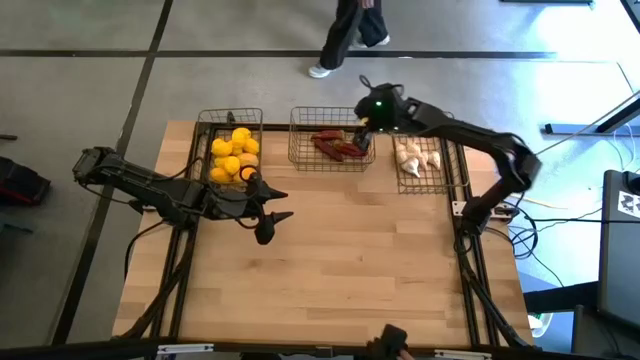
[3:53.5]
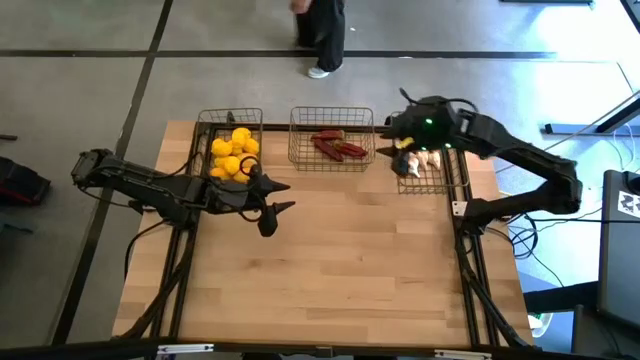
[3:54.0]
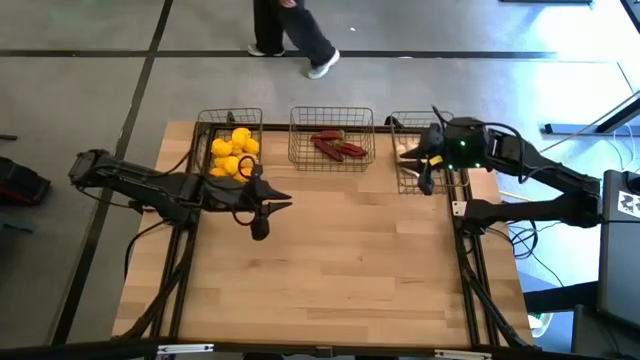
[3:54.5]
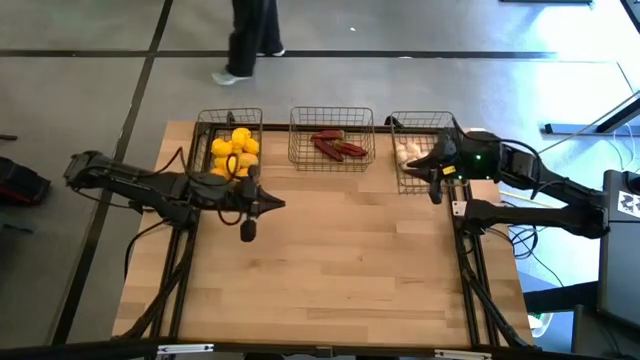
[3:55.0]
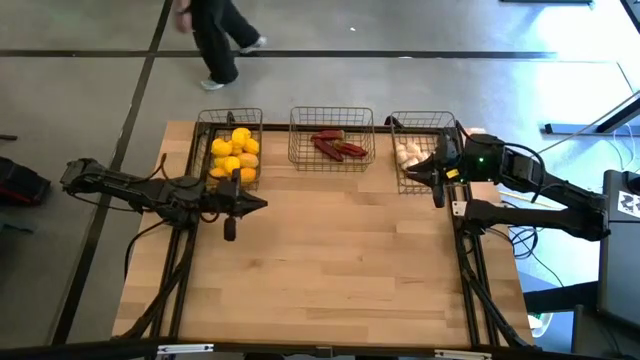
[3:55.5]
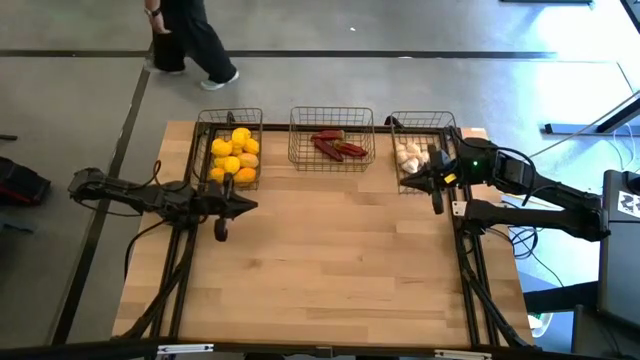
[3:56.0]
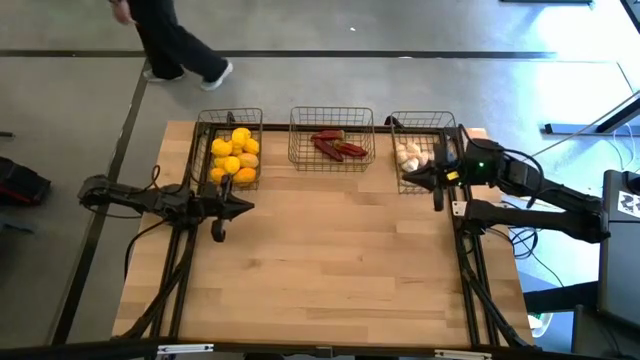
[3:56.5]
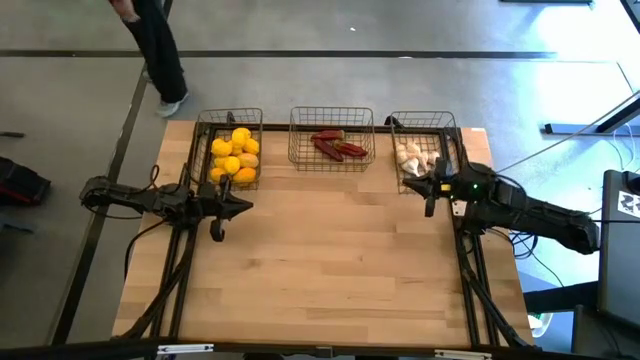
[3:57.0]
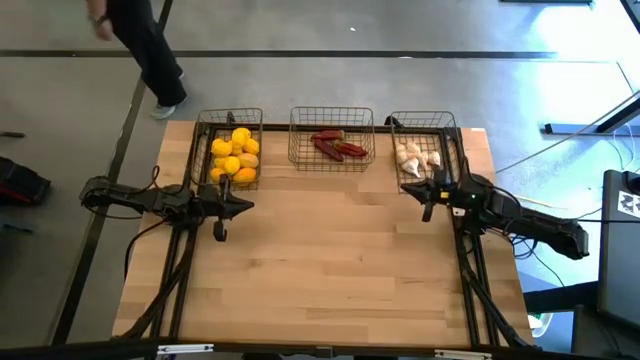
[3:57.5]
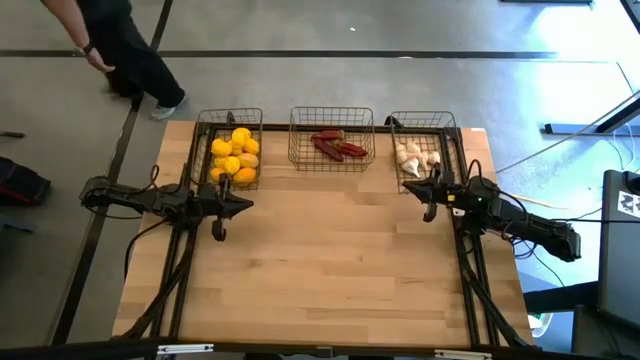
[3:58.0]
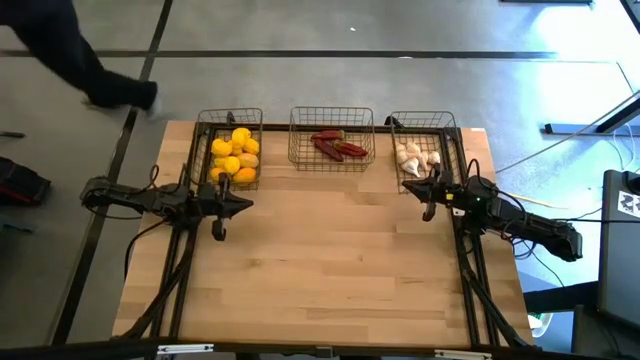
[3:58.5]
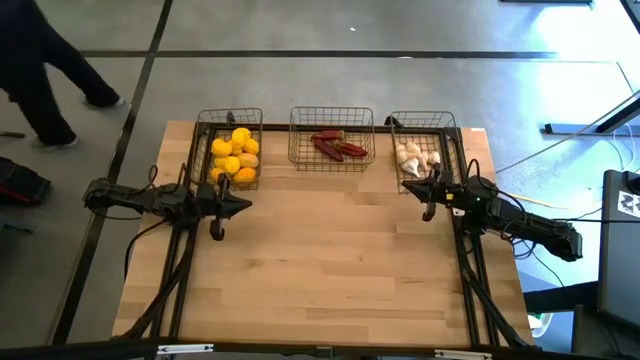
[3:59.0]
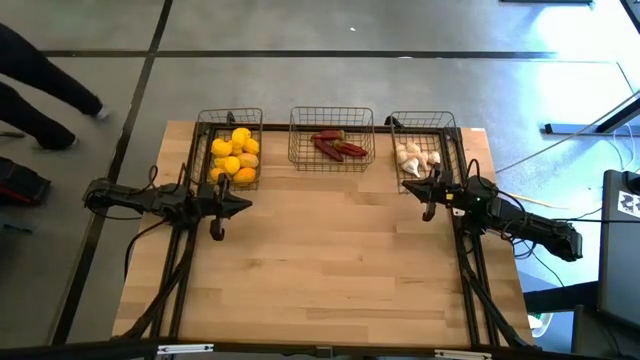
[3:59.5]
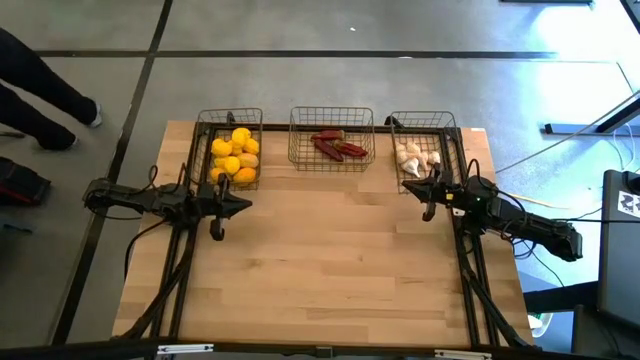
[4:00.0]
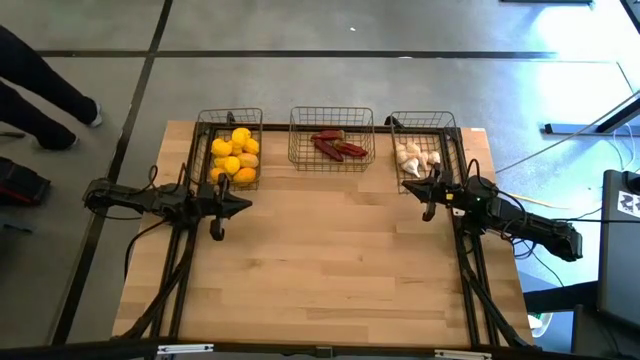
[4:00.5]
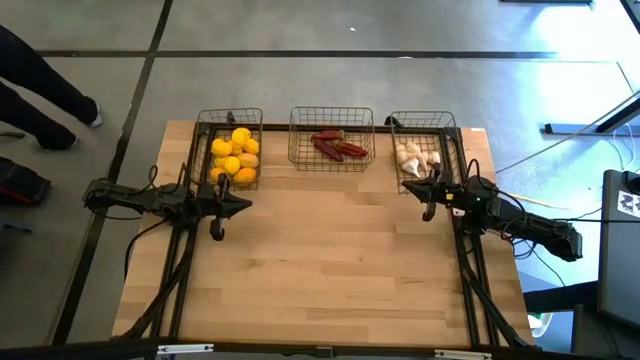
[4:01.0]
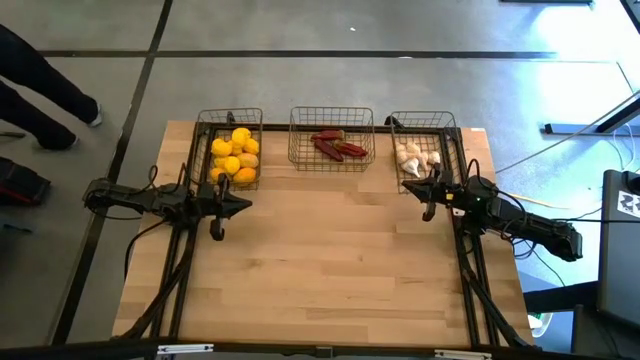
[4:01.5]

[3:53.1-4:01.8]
Task: Sort produce into baskets
Return to Home Position

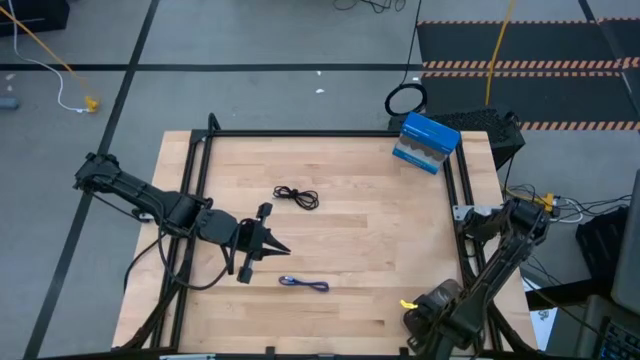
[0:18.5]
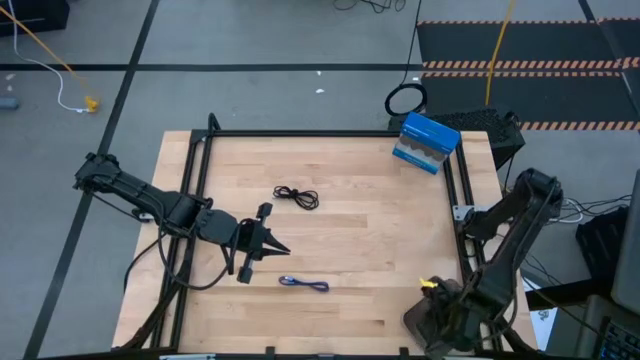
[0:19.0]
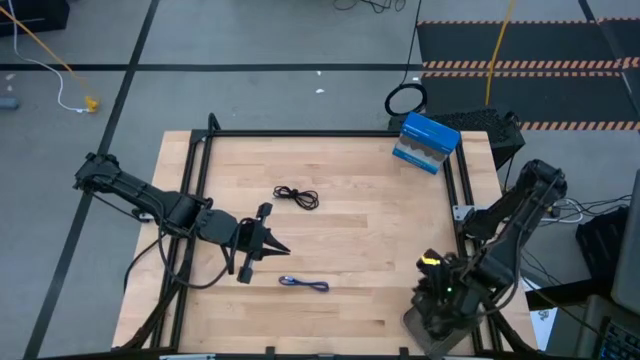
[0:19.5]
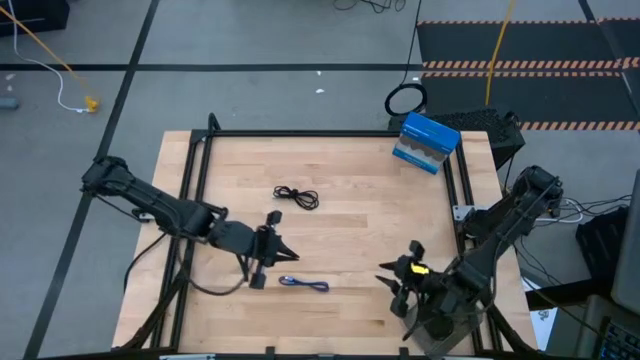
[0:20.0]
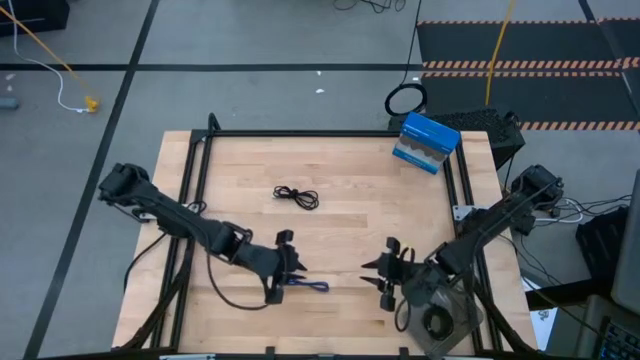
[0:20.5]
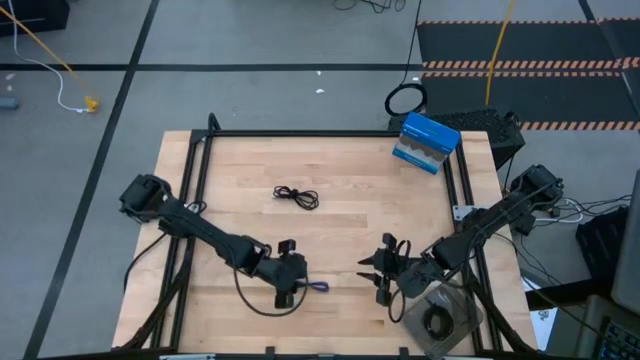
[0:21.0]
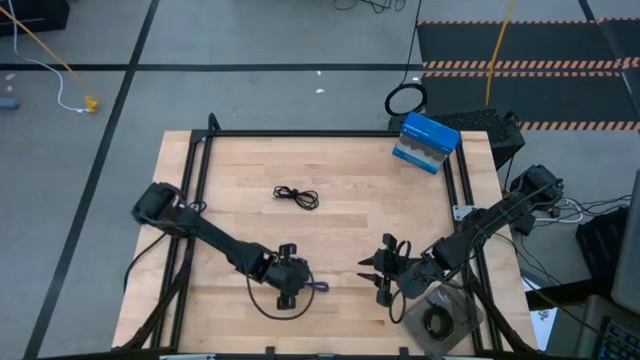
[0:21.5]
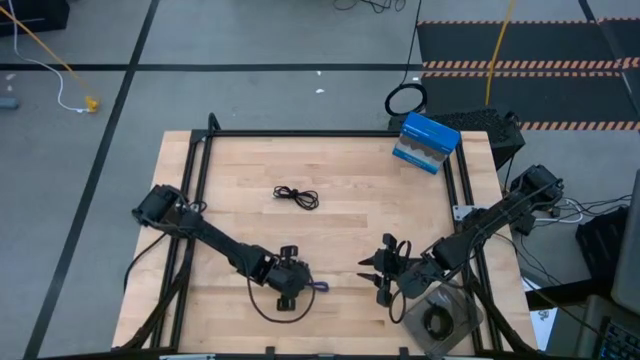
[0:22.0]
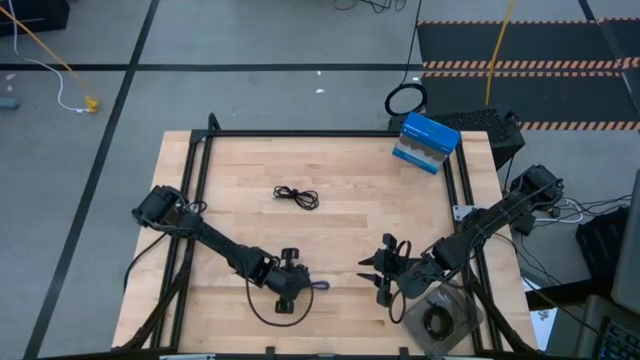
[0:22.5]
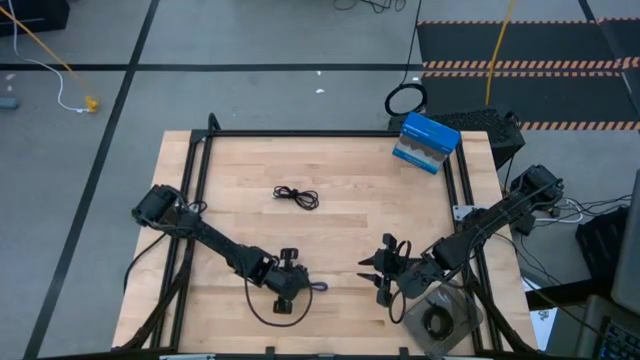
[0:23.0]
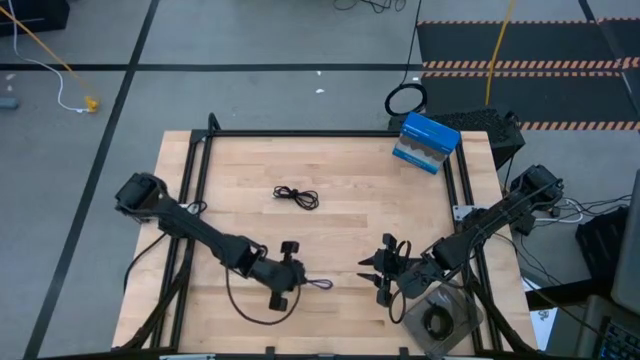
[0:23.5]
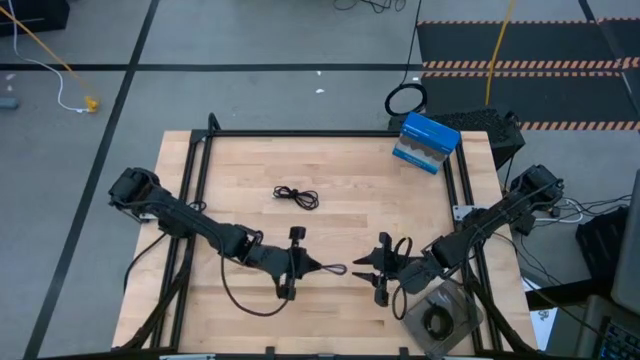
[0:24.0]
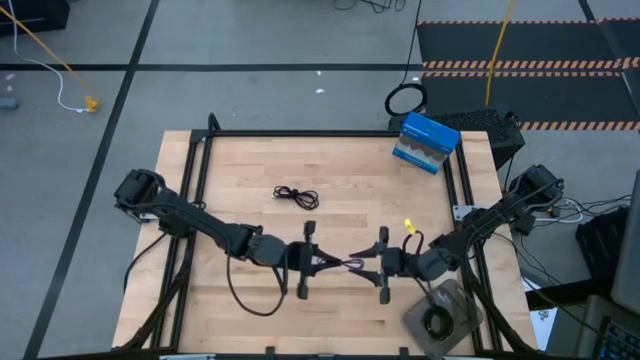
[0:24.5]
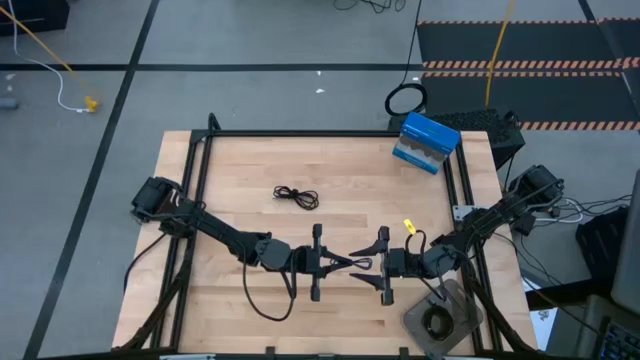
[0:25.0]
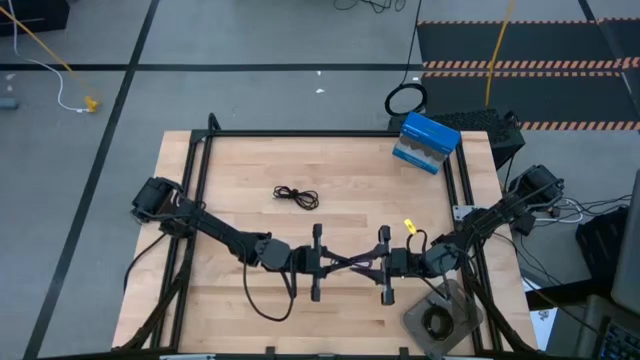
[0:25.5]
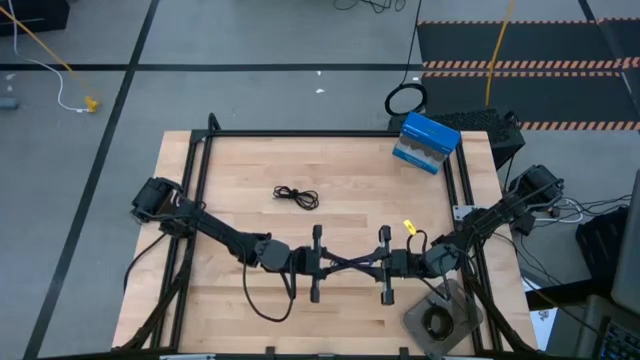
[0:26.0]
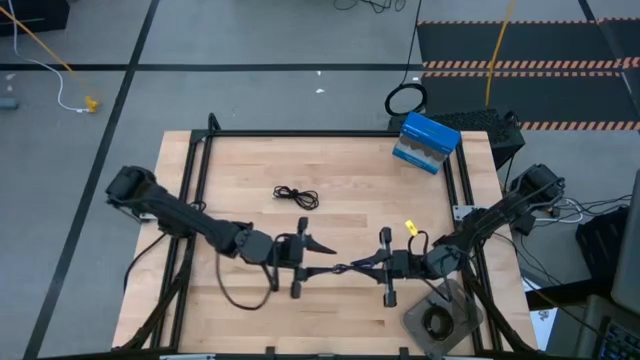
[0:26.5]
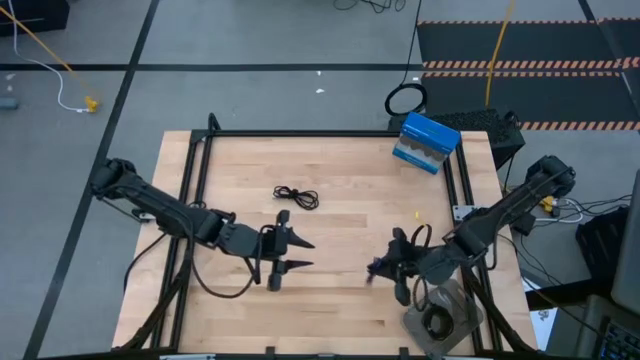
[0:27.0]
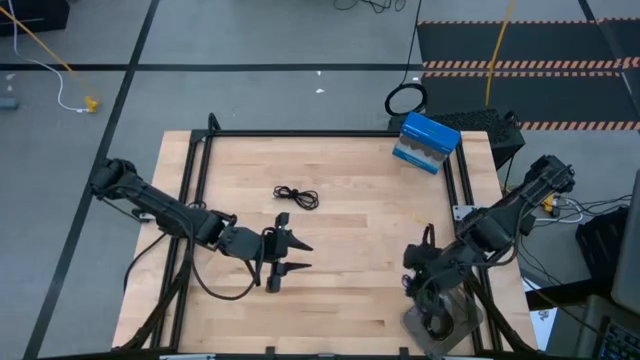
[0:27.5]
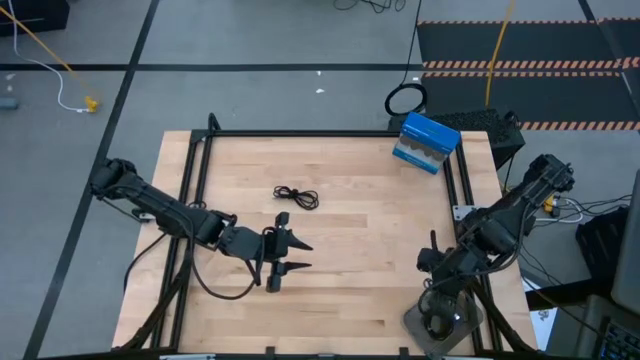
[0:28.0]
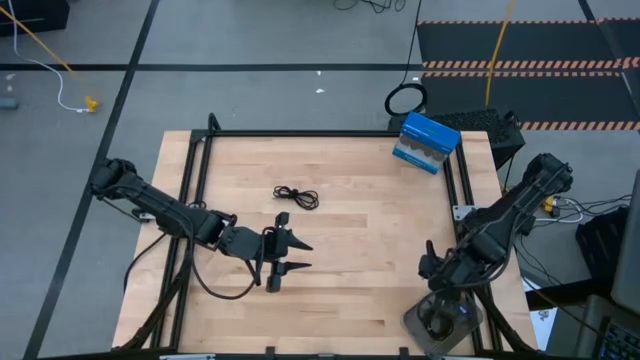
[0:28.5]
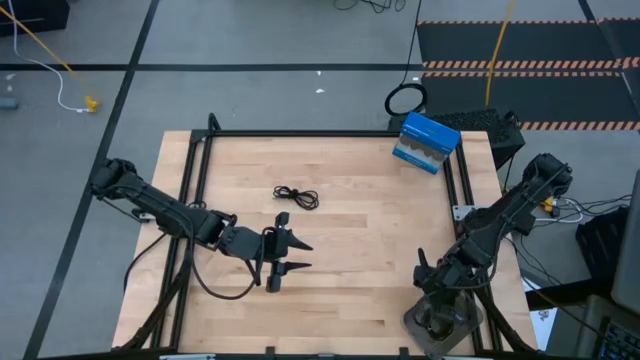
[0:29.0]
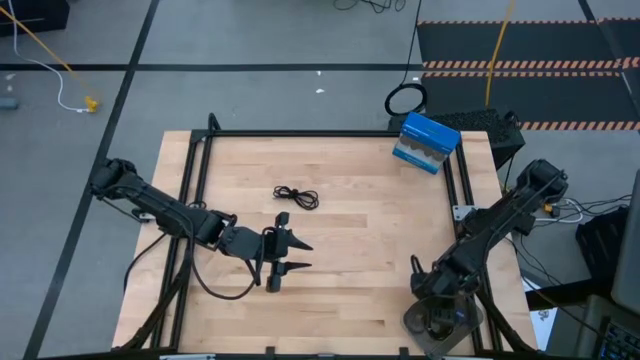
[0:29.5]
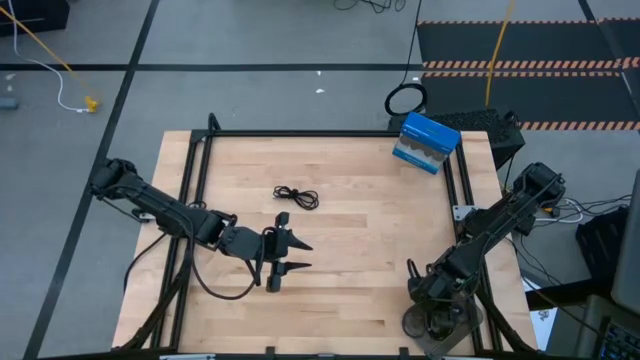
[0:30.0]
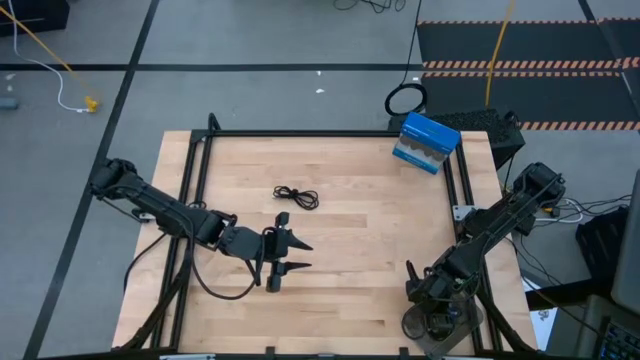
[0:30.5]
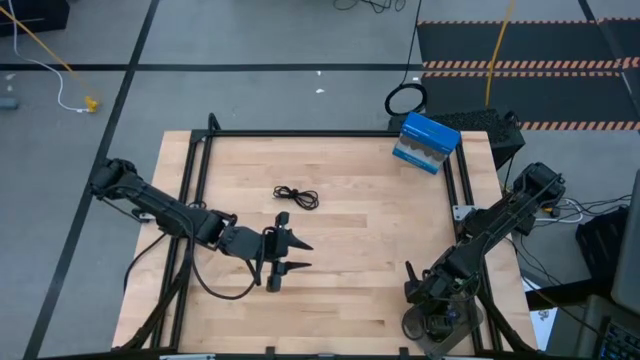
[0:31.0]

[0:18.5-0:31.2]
Task: Pick and place USB-C Cables
Put the purple charger cable into the black bin
